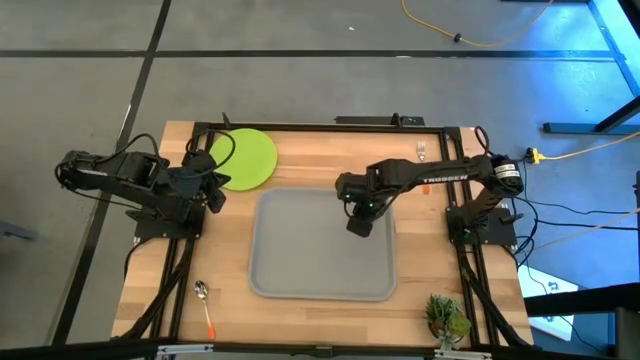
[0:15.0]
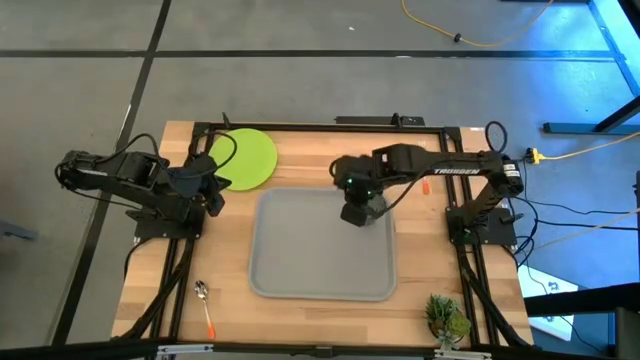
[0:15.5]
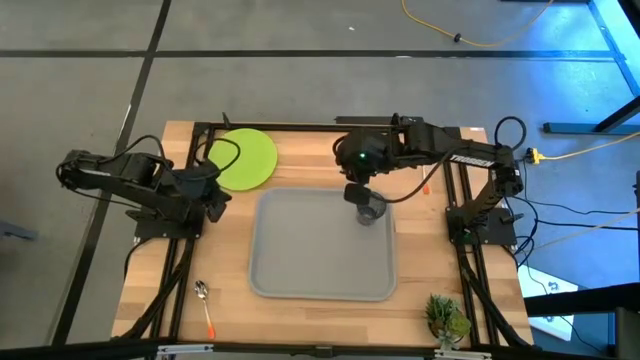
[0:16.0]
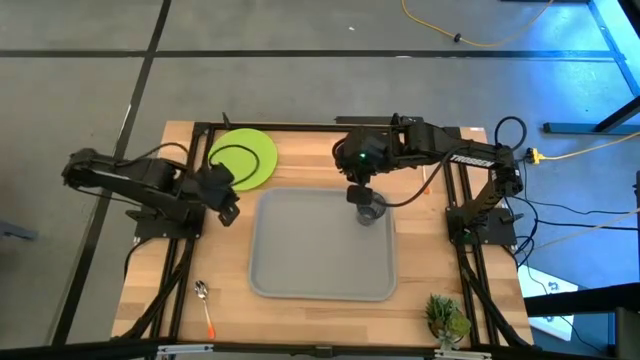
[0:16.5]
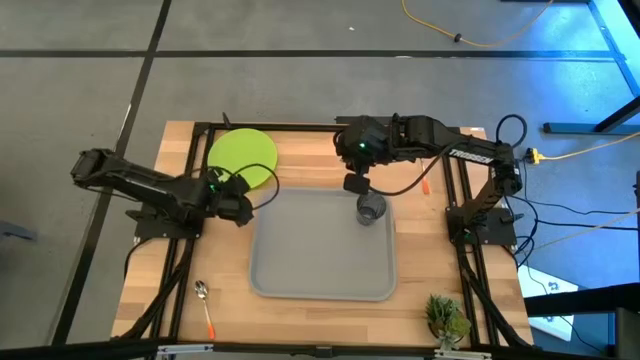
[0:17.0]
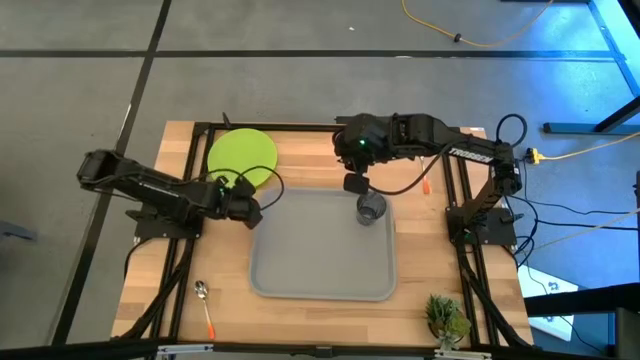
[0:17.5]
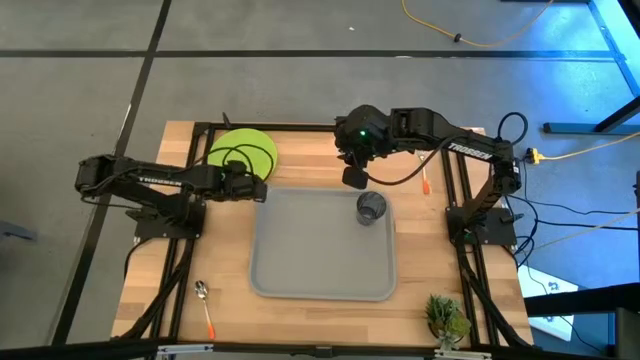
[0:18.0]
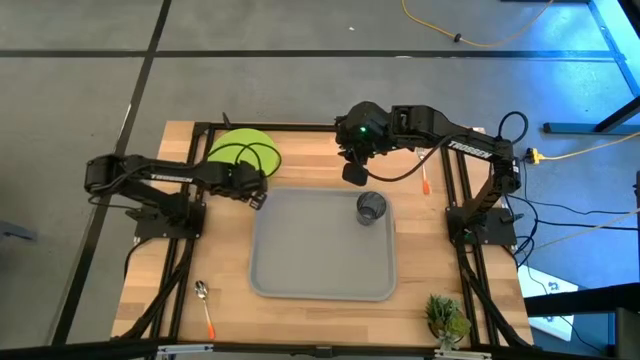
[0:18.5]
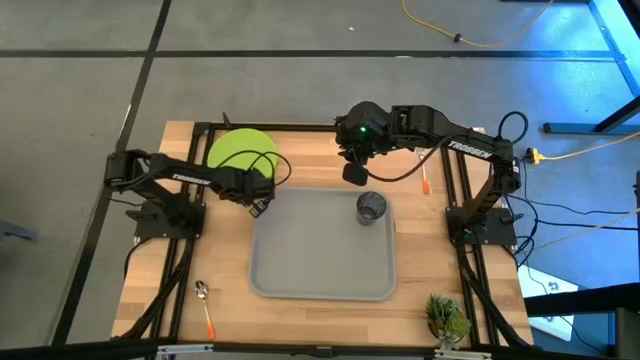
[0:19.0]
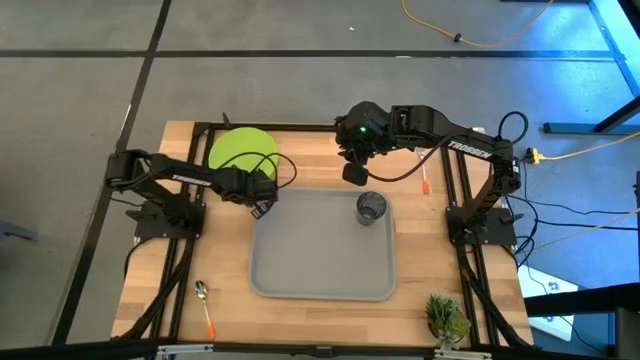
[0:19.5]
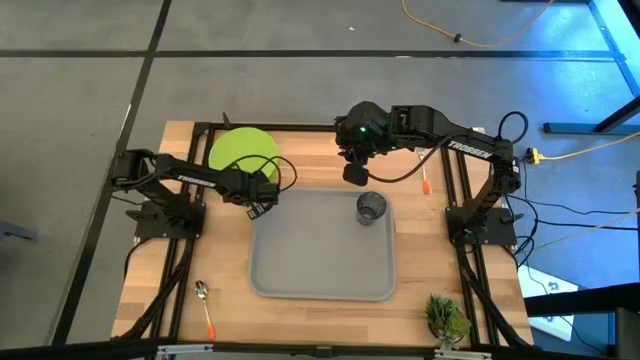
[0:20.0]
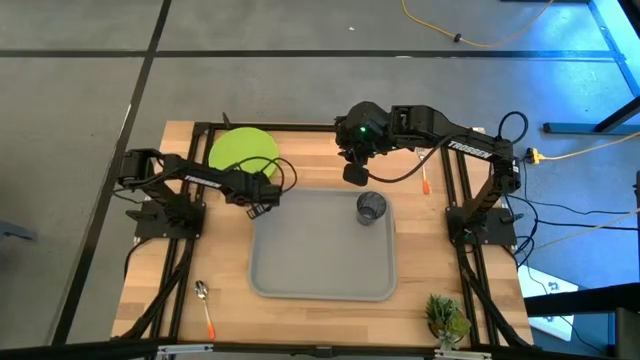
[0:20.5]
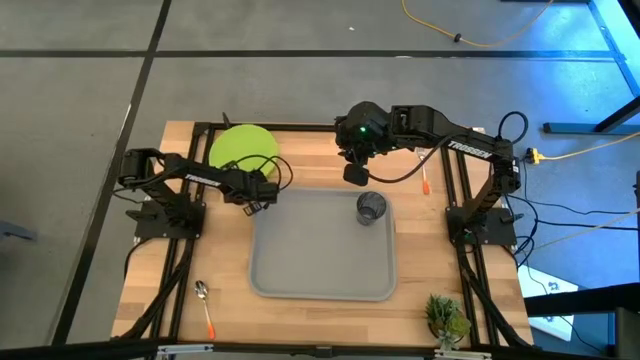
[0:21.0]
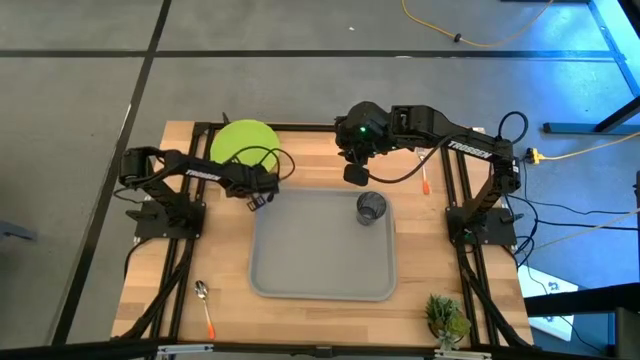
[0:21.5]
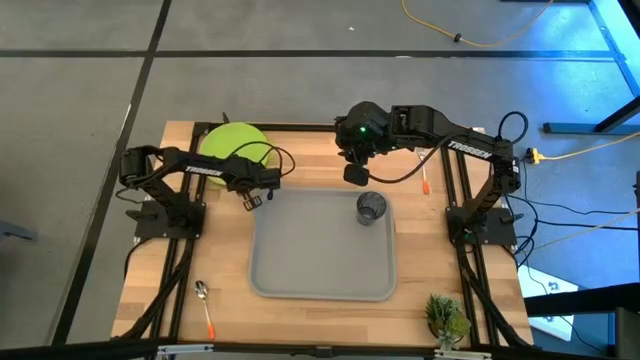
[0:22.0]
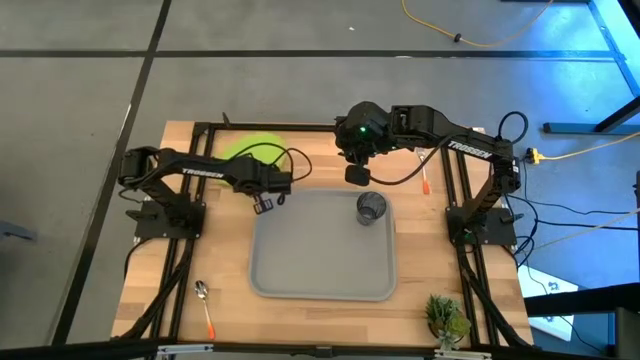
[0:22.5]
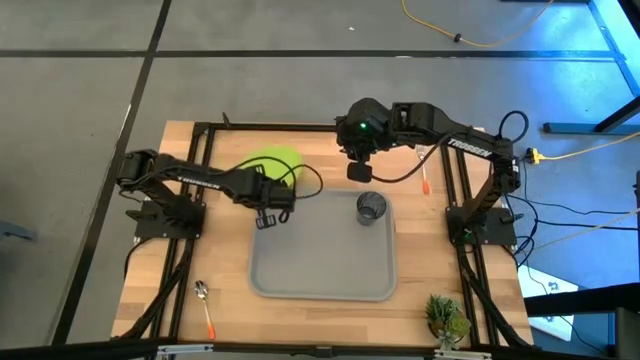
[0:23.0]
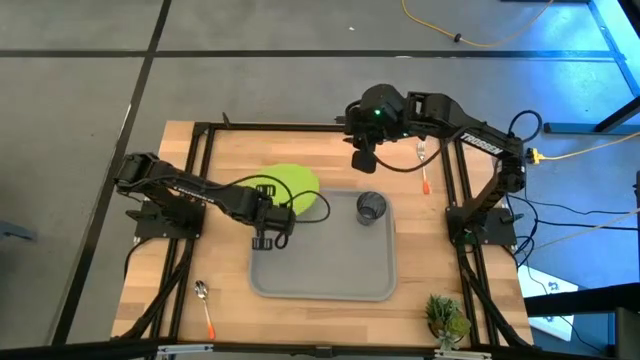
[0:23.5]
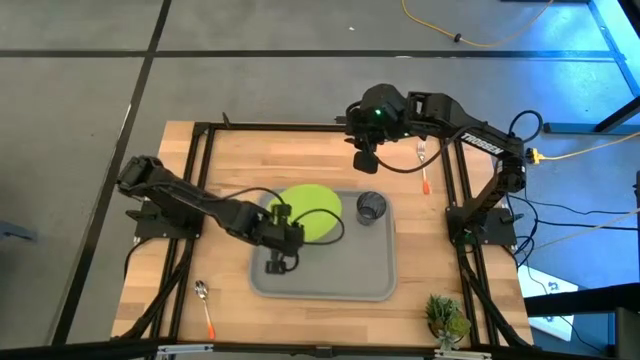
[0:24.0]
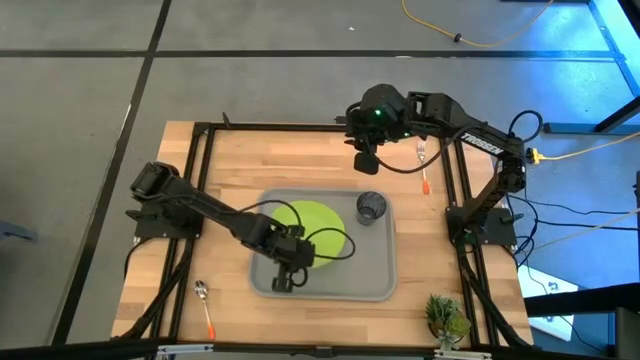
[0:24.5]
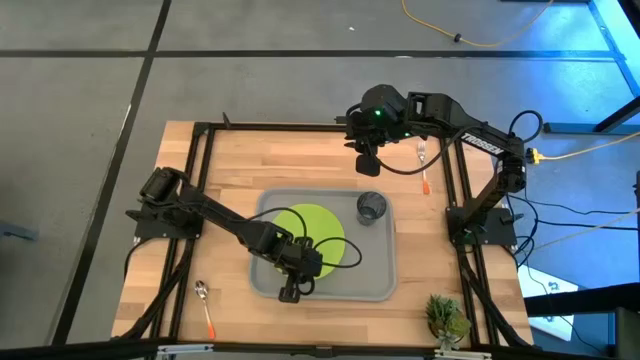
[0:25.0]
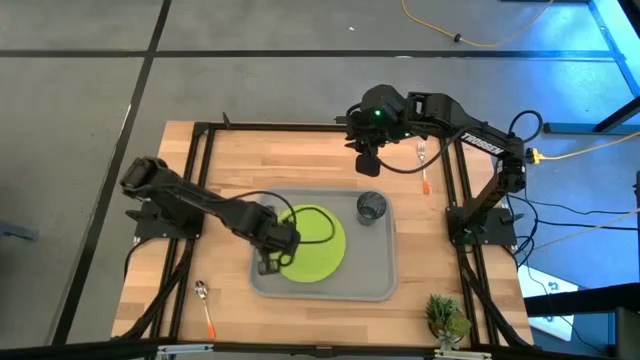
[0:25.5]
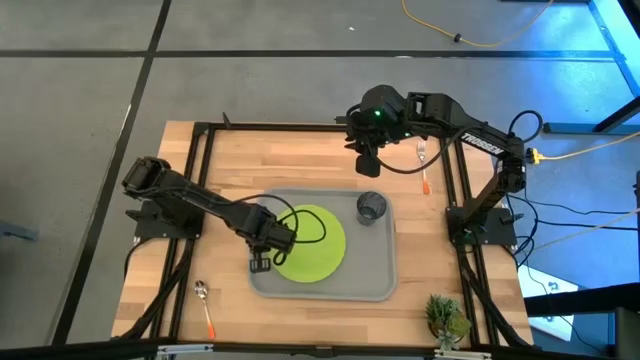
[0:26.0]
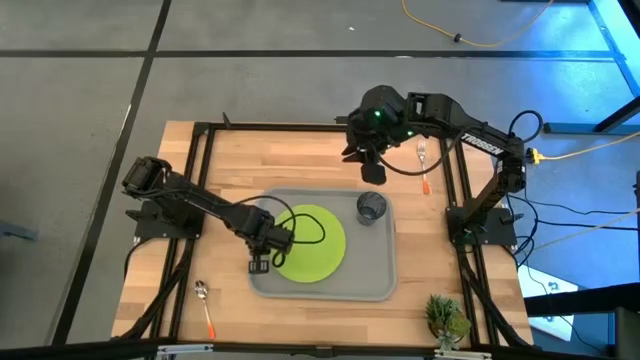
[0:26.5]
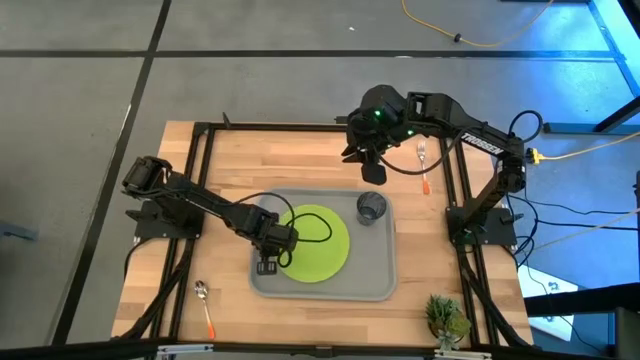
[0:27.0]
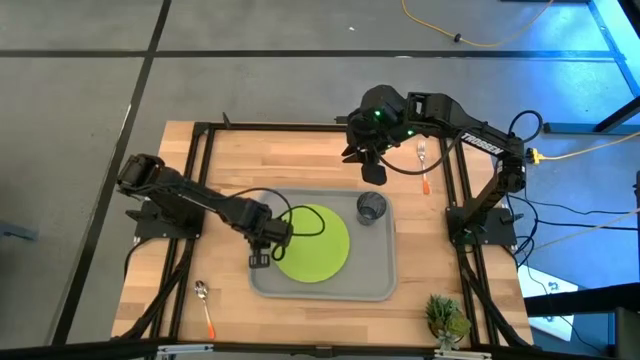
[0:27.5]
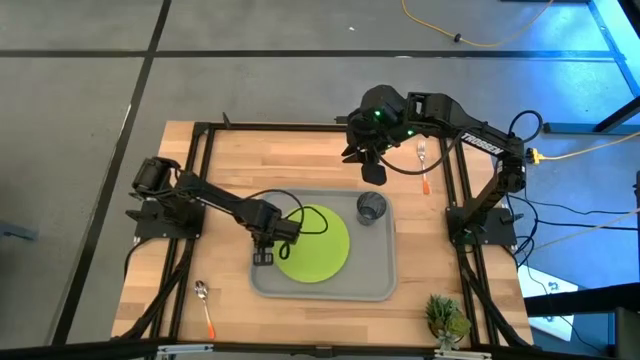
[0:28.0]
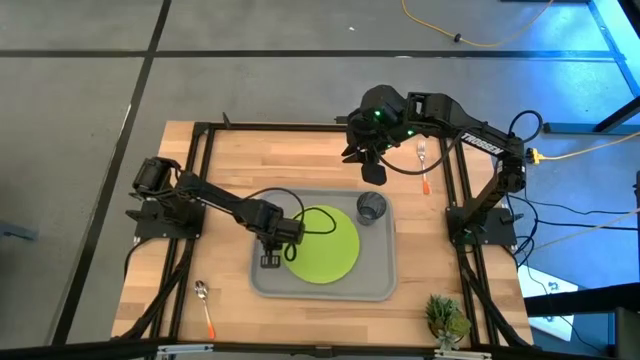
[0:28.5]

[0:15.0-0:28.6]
Task: Pick and place plate/cup/fork/spoon on tray
Put the green plate on the gray tray

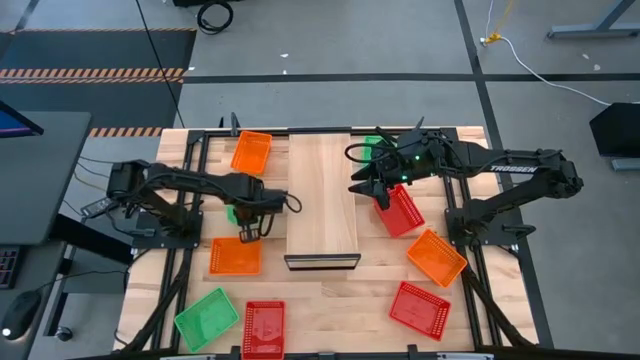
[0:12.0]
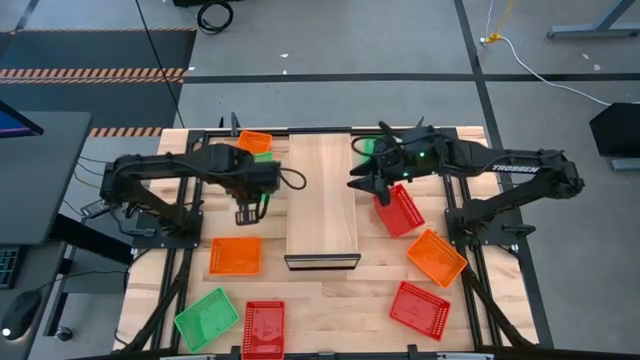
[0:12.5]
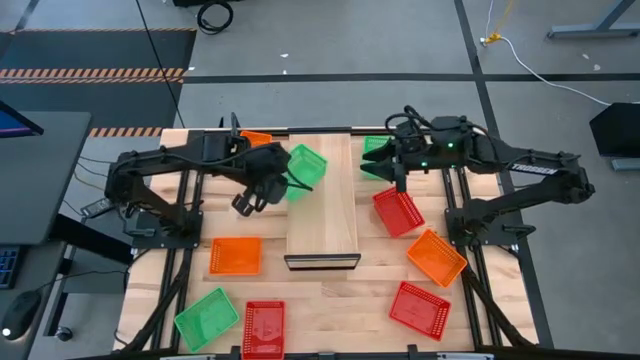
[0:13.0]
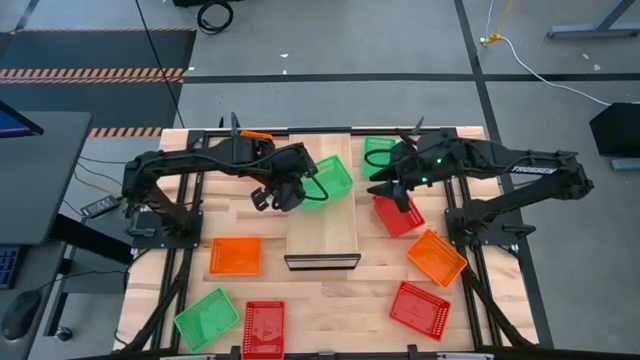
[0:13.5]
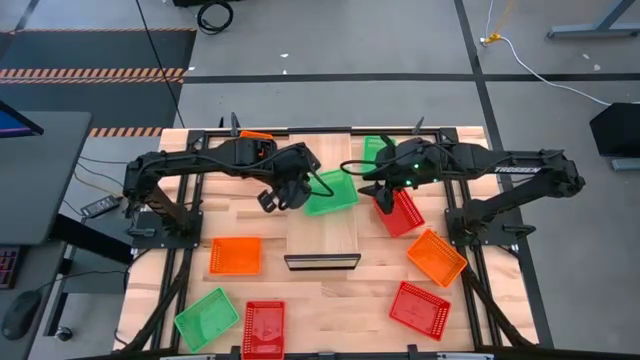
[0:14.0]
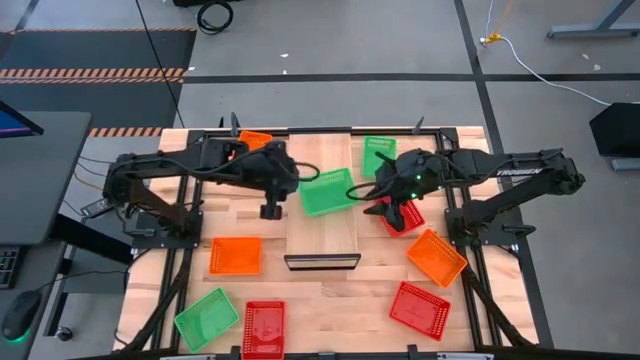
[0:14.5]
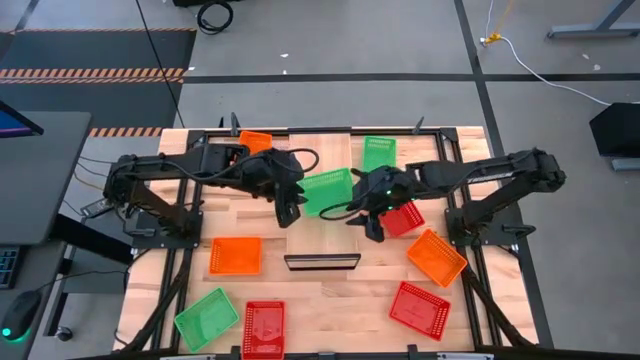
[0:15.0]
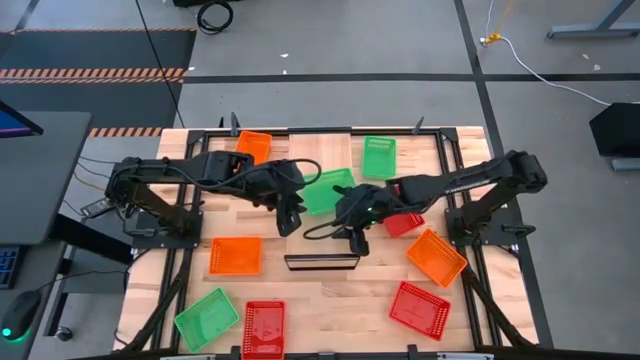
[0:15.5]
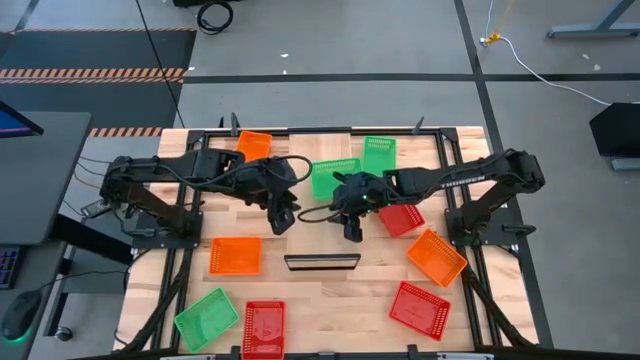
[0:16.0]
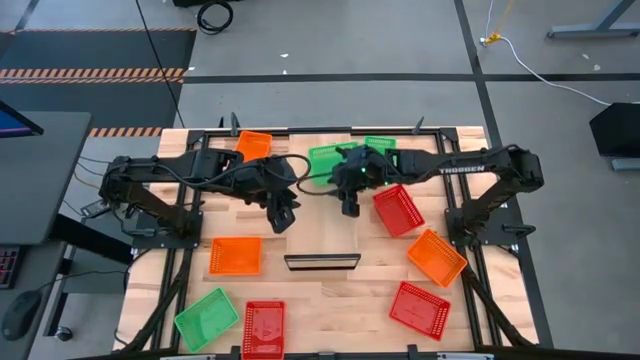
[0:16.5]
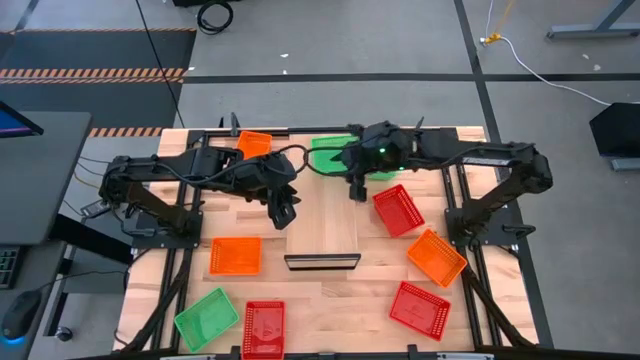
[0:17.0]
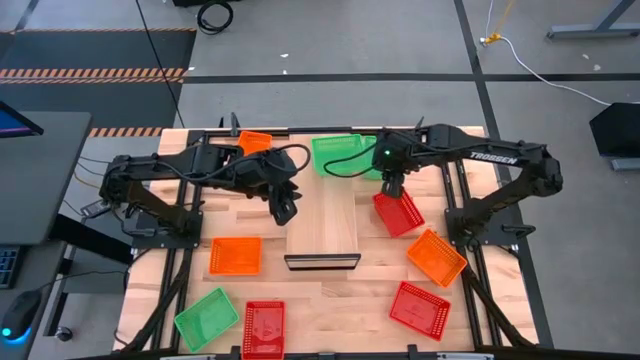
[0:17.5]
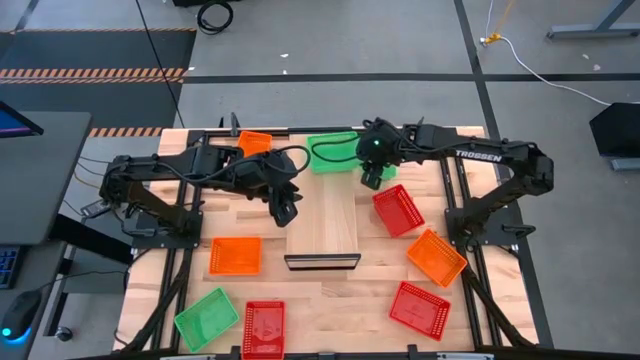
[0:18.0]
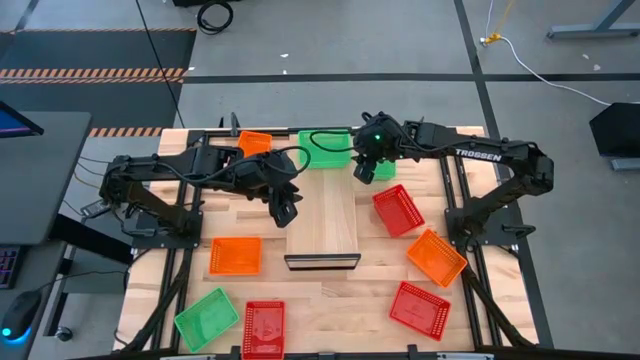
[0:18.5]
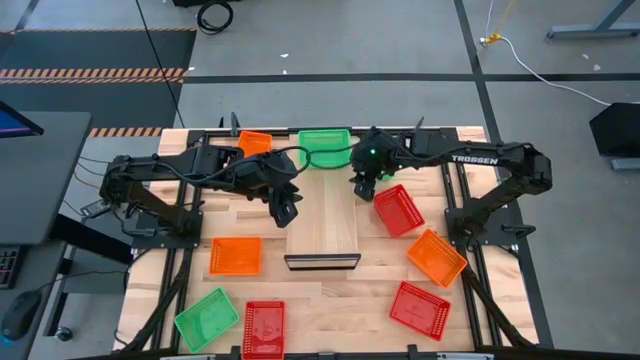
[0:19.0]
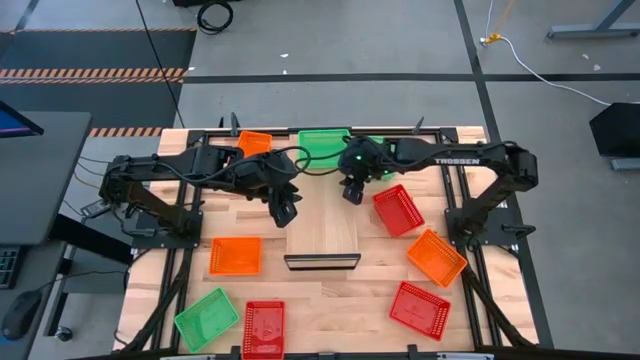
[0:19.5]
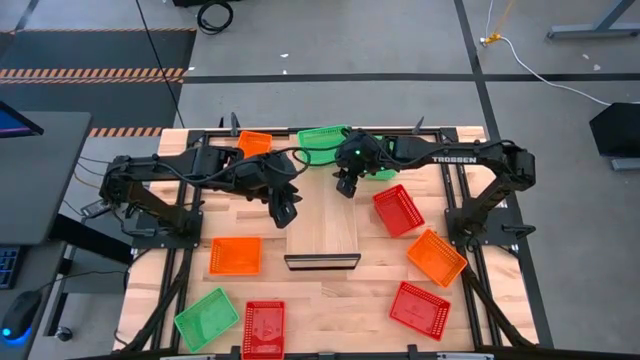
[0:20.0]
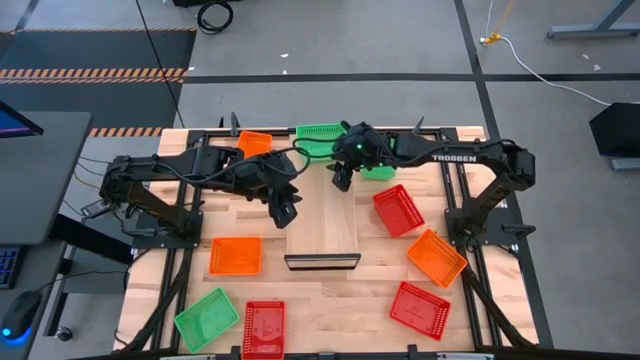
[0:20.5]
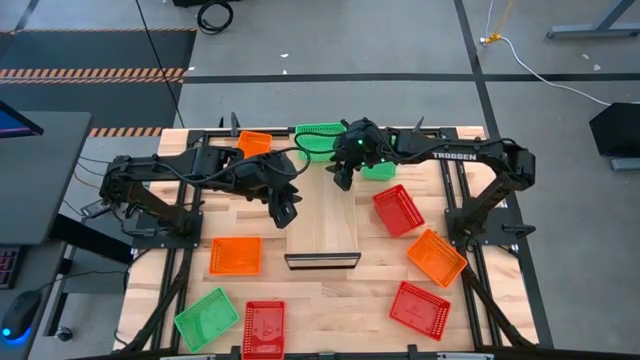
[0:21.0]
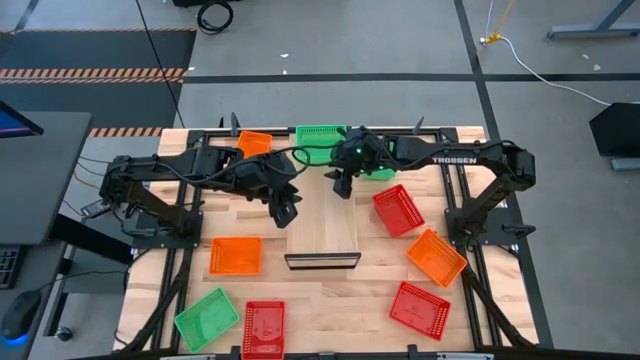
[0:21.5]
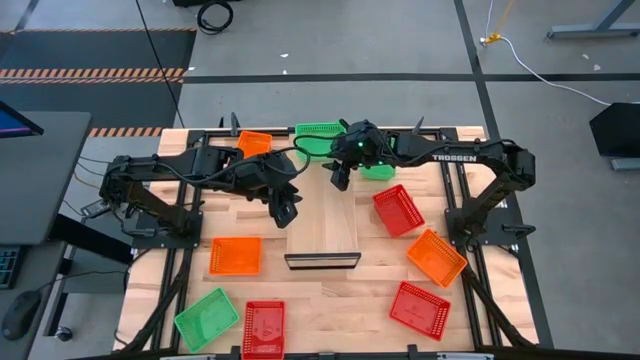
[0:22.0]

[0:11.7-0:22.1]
Task: Stack baskets on shelf by color
Put the top left green bin on the shelf
